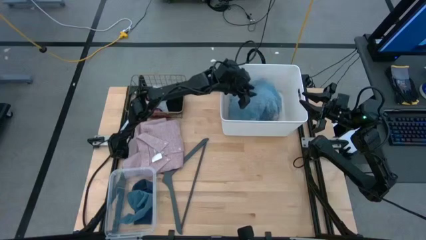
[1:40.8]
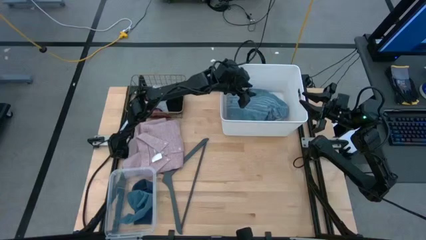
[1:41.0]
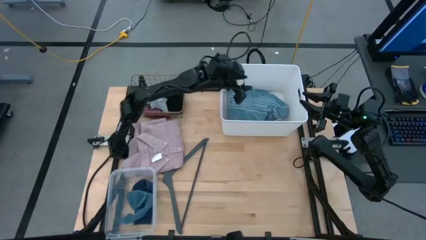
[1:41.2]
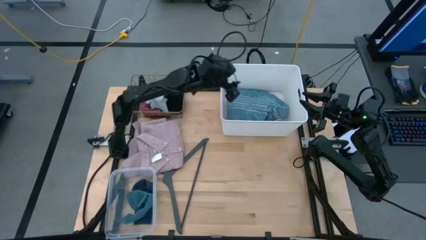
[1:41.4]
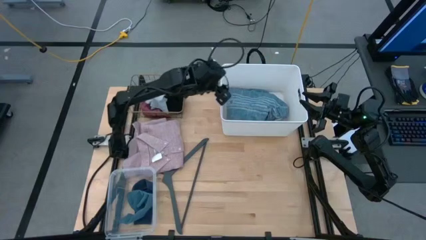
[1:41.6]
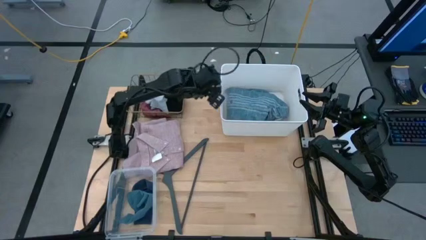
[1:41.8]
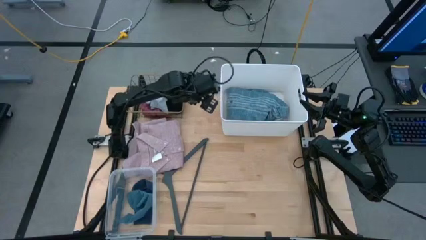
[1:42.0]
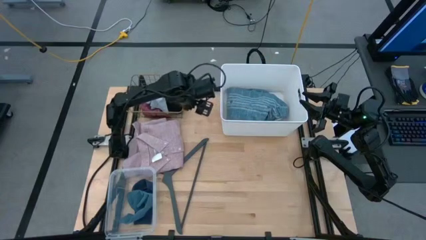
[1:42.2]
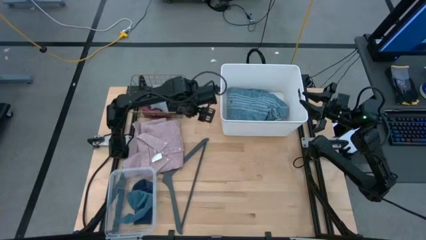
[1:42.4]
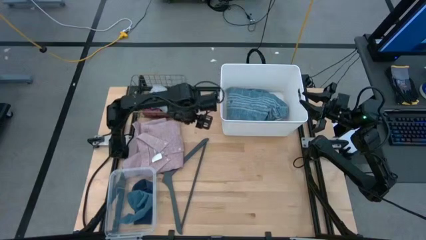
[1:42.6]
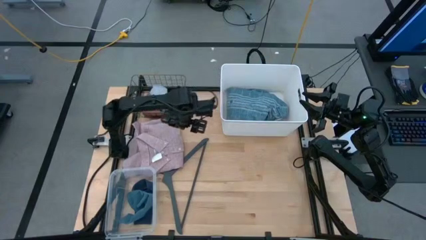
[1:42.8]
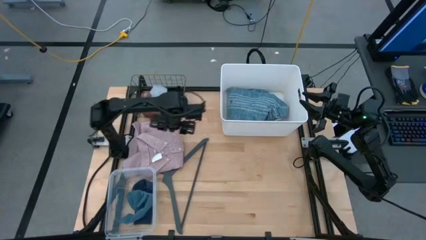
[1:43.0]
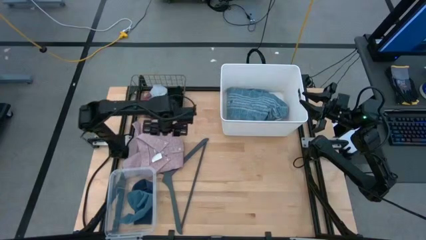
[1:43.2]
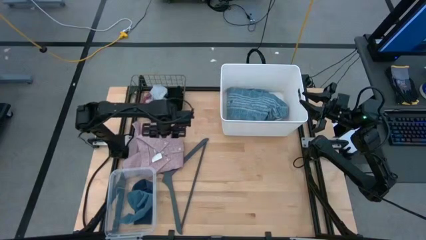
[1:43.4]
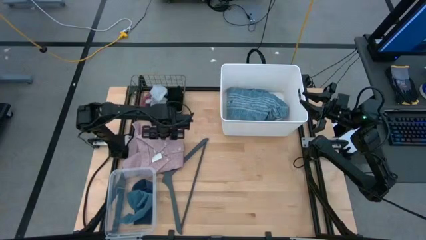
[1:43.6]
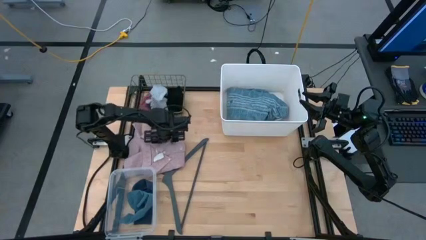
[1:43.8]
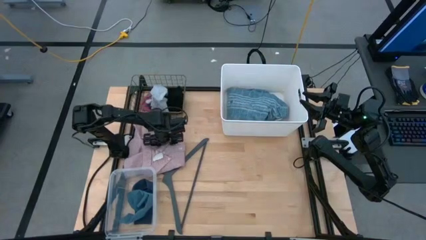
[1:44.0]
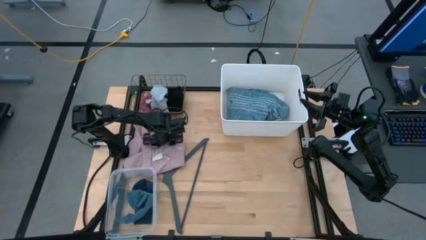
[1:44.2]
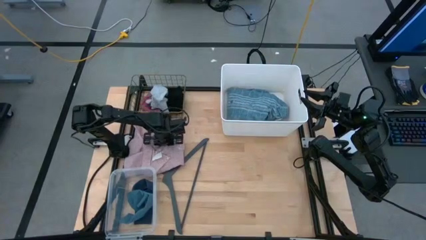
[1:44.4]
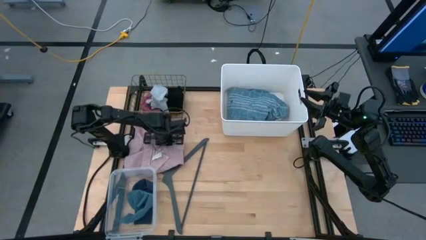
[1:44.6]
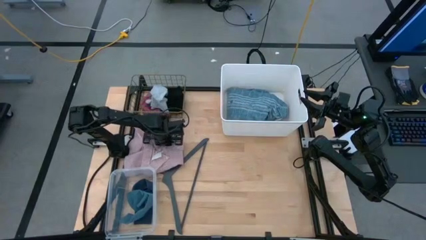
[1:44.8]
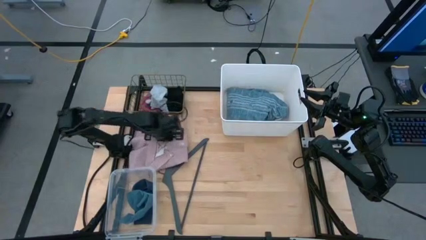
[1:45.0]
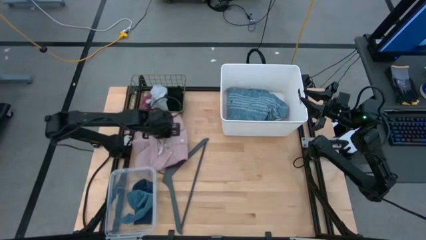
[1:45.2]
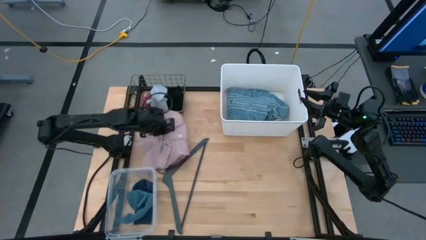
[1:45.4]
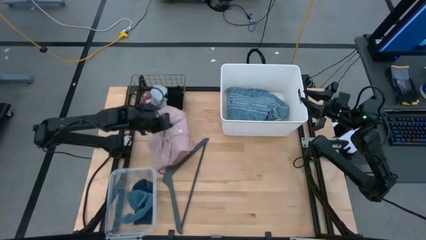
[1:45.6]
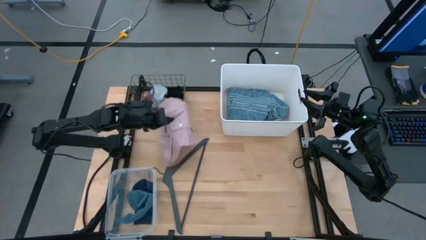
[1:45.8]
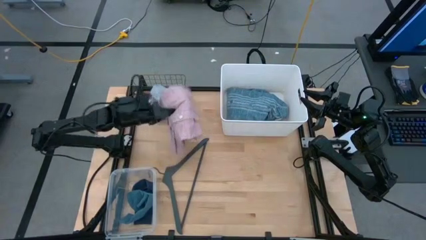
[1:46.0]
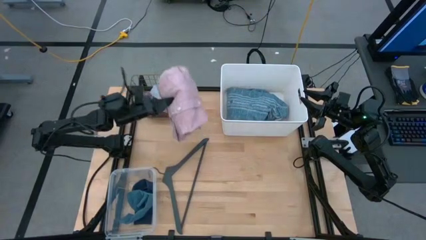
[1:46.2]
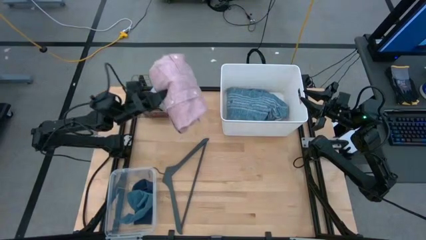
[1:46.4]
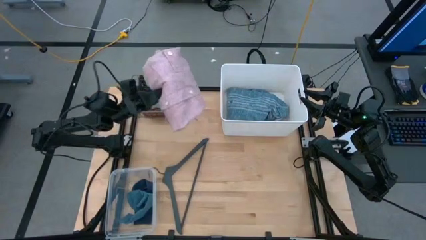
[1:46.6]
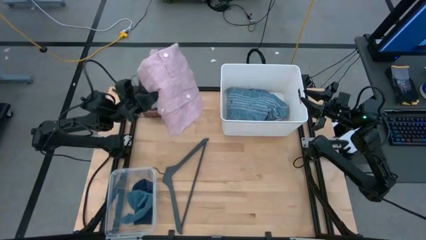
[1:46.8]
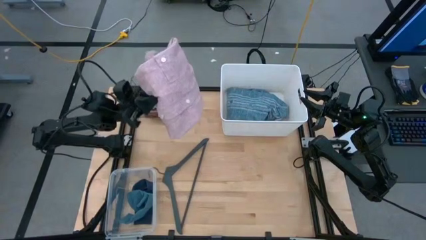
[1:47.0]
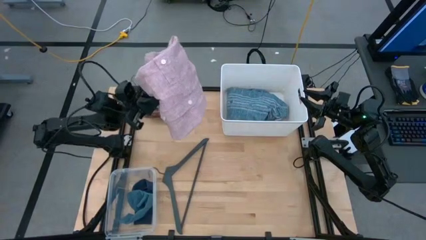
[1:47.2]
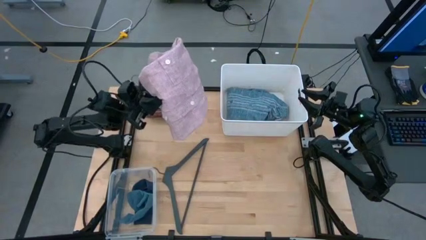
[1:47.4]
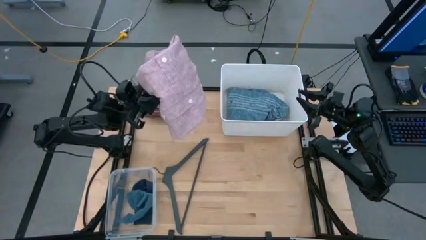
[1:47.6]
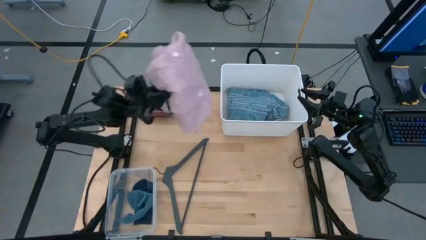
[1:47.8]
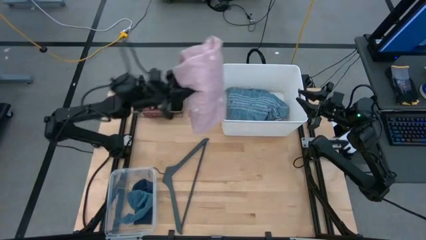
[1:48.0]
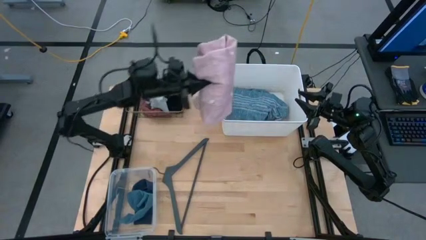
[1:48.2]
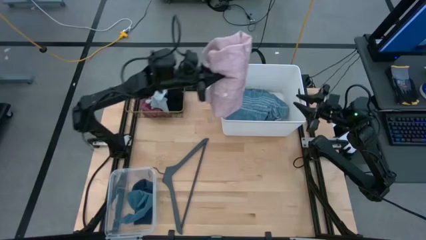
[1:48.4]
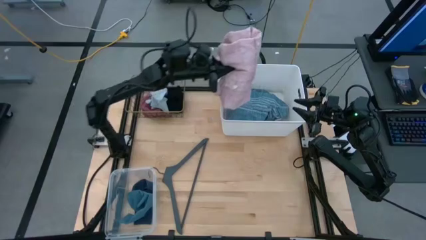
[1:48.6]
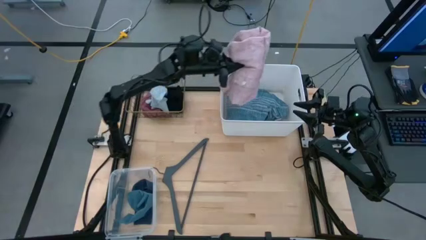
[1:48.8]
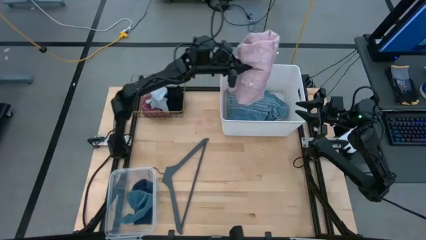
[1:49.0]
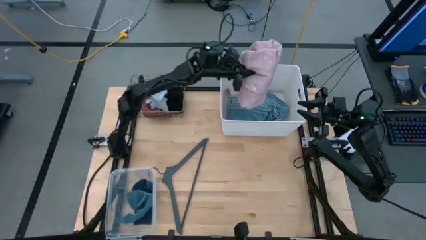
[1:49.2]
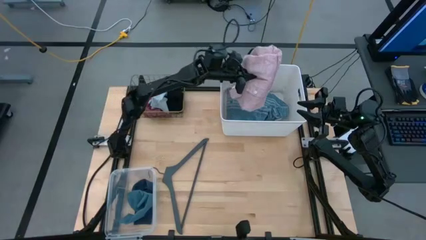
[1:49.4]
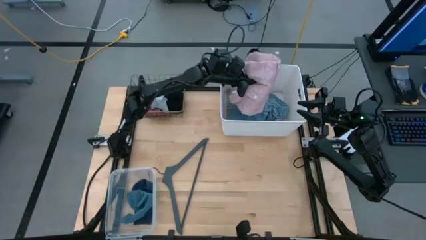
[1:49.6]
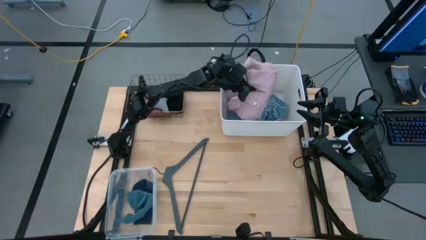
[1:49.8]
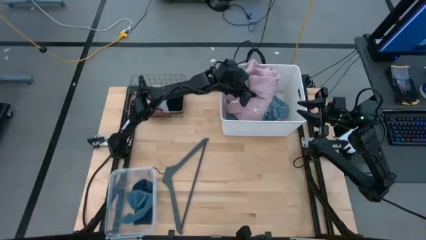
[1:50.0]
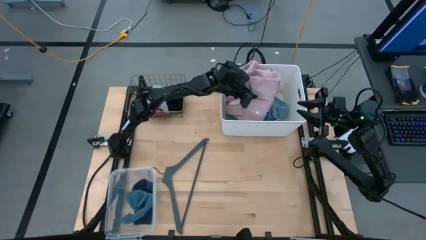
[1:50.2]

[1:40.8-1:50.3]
Task: Pick & Place Cloths
Put the pink shirt into the white bin
